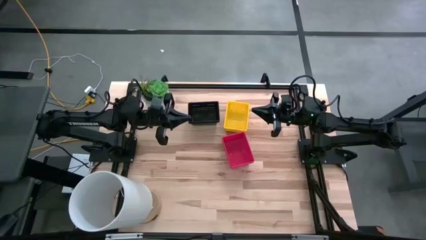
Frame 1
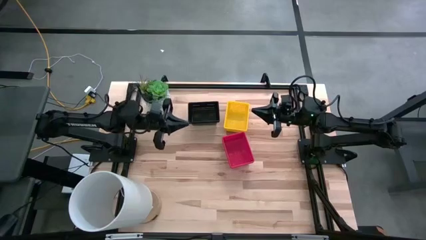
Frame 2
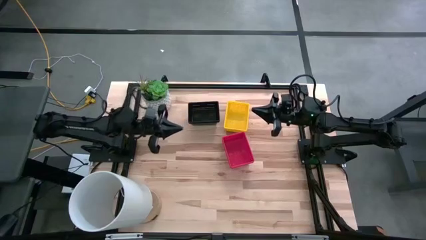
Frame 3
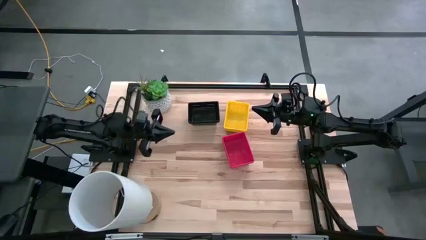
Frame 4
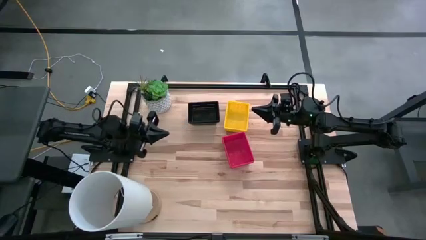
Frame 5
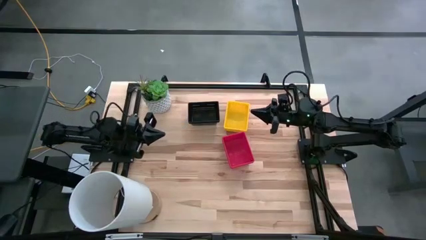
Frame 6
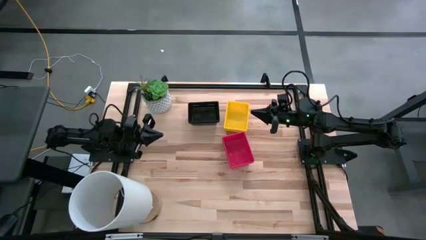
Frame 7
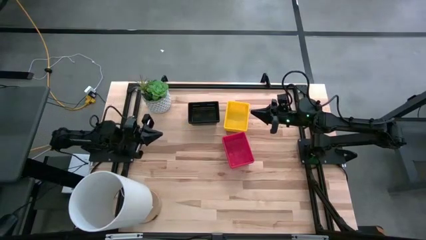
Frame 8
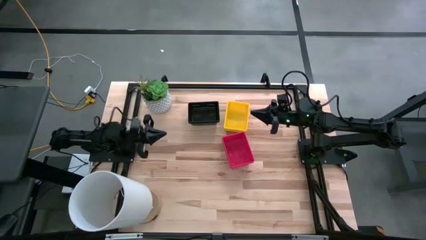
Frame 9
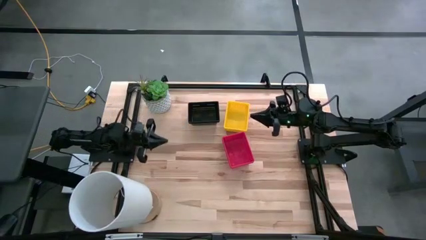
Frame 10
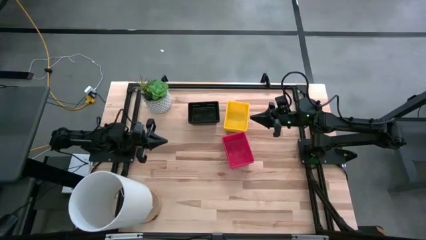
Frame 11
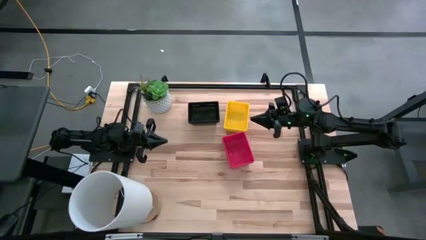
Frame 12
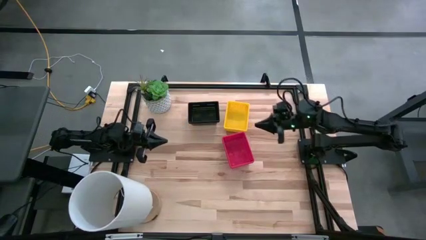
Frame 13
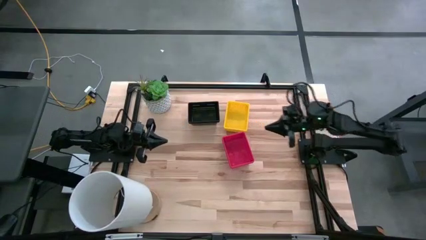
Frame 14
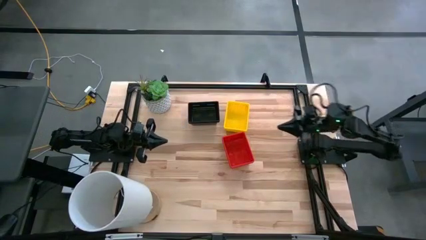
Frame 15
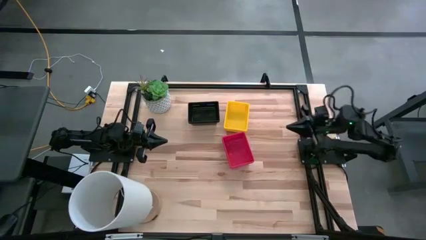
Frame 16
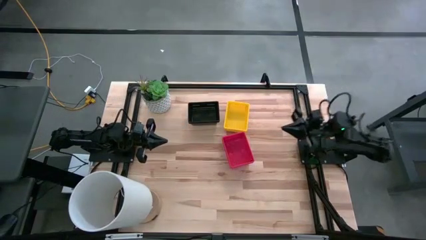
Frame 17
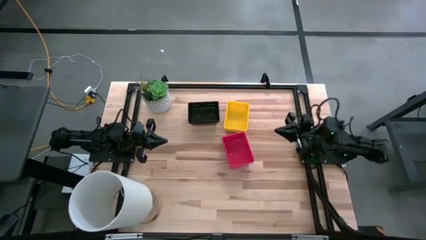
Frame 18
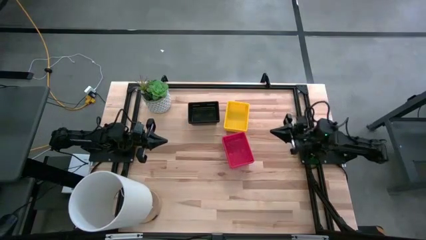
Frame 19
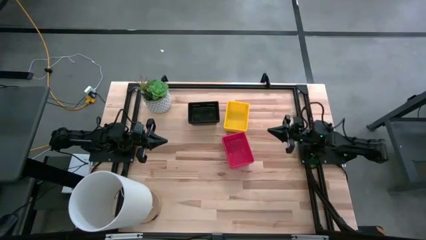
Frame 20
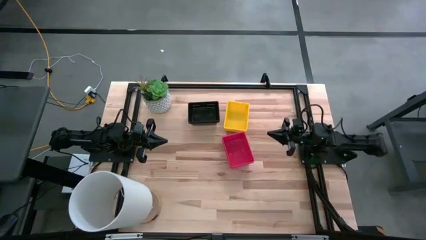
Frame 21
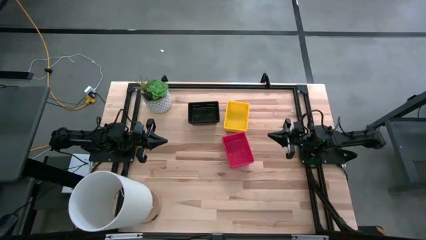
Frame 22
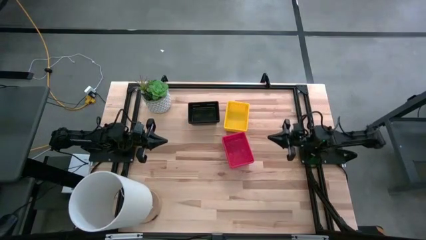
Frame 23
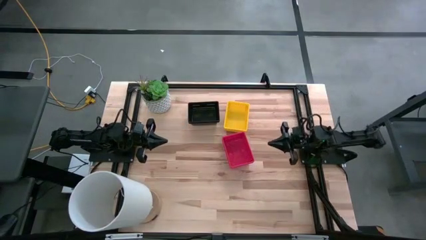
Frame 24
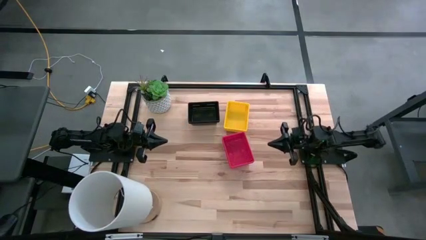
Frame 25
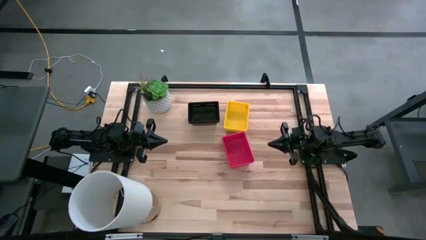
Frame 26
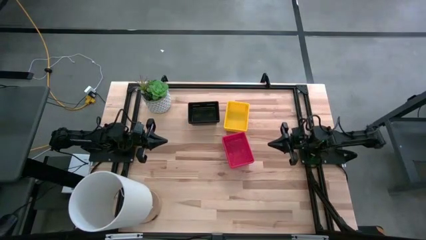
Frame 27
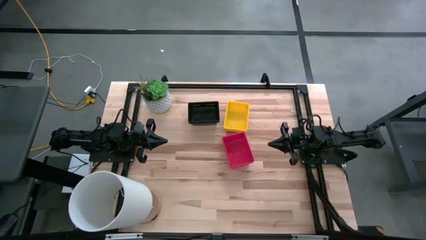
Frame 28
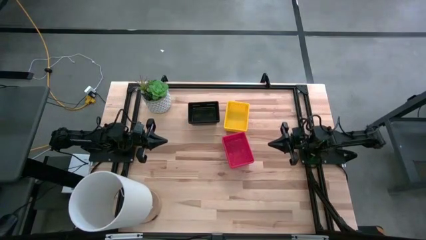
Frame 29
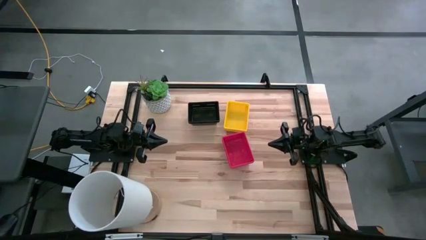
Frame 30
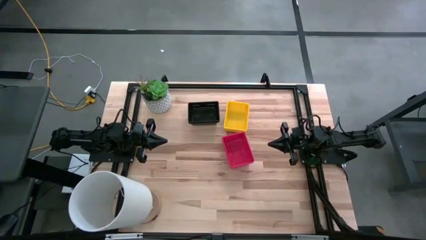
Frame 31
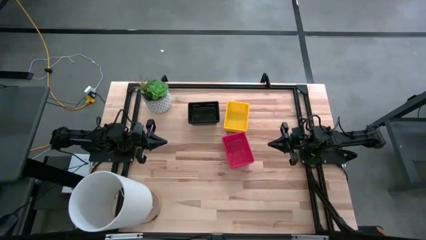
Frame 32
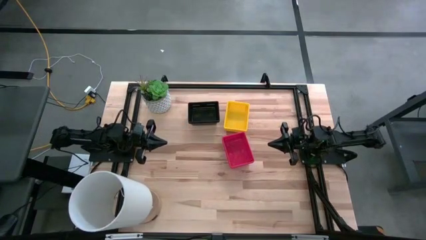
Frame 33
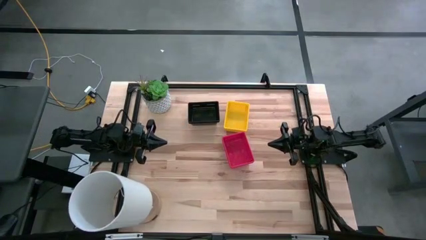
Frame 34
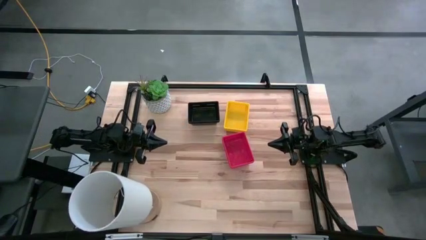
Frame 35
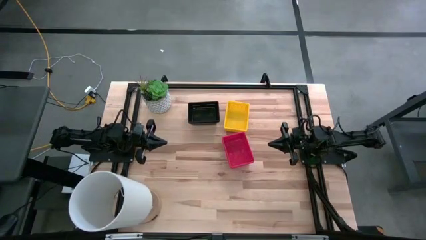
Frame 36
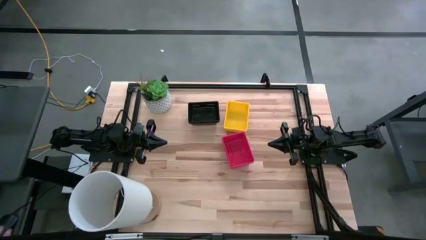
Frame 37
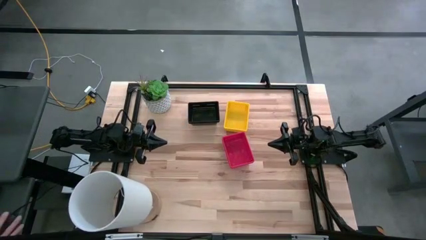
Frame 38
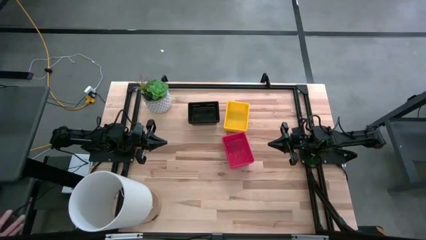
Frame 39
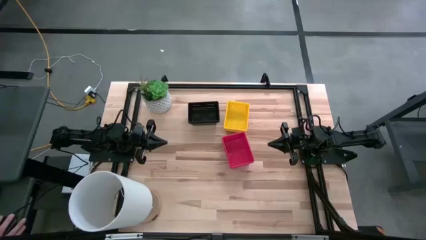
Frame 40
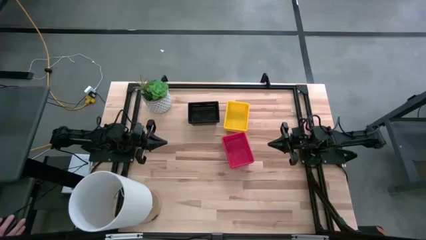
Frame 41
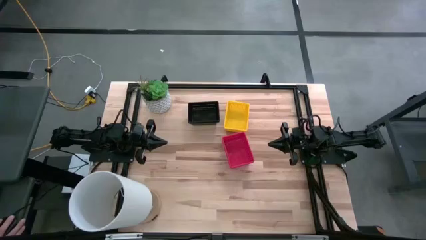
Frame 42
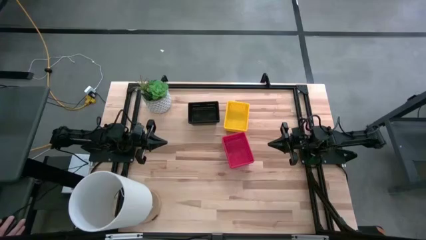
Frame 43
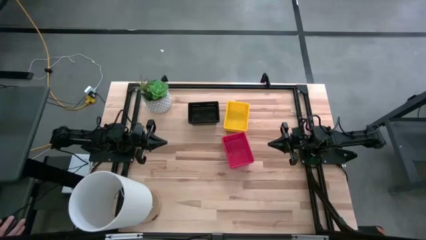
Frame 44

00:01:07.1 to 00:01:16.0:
Return to Home Position

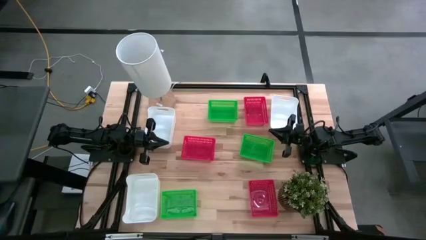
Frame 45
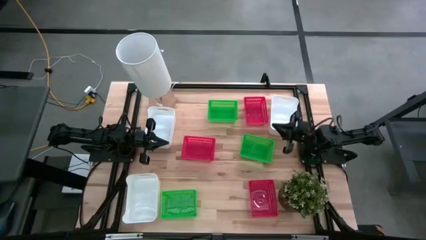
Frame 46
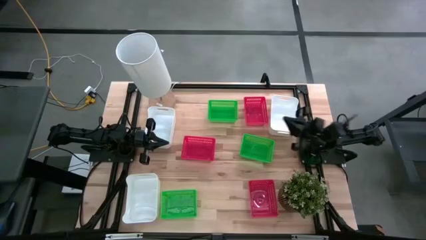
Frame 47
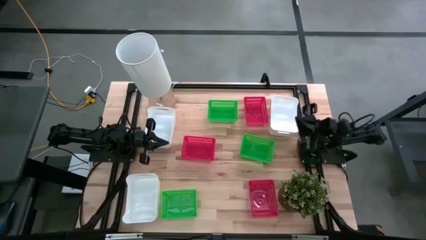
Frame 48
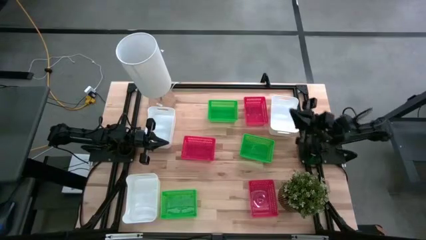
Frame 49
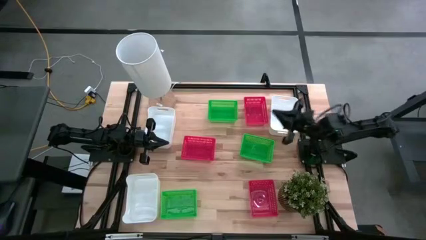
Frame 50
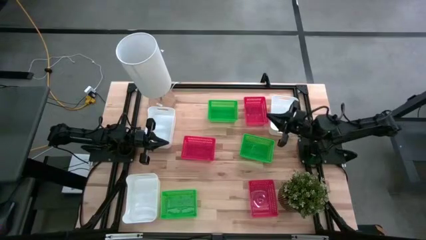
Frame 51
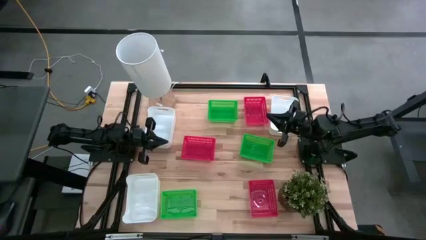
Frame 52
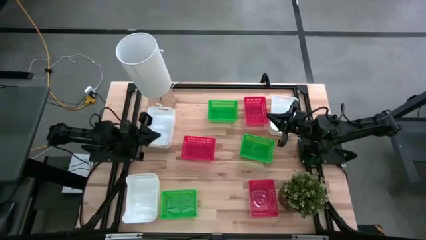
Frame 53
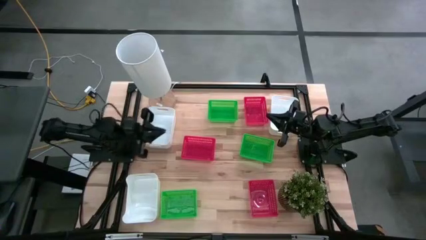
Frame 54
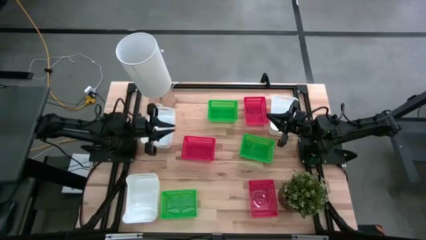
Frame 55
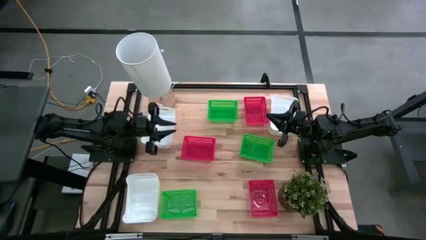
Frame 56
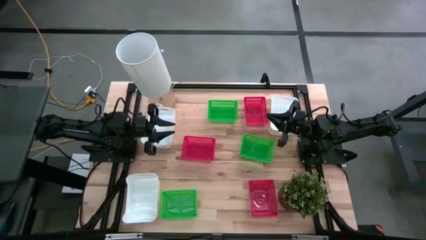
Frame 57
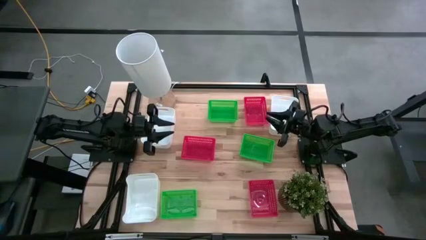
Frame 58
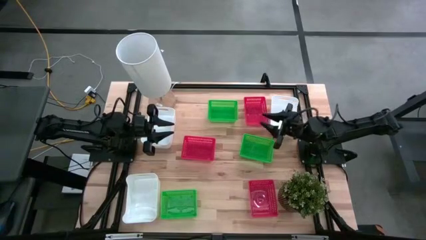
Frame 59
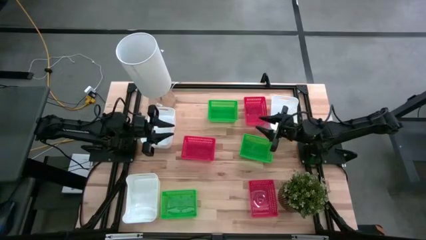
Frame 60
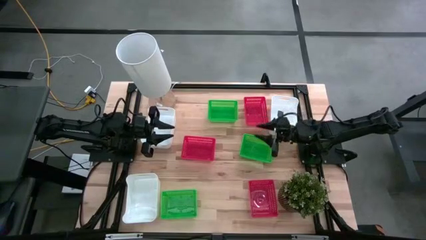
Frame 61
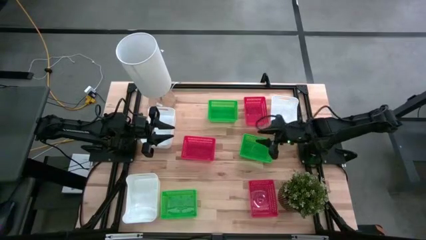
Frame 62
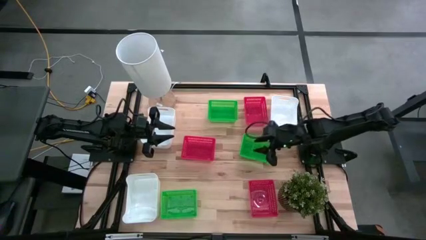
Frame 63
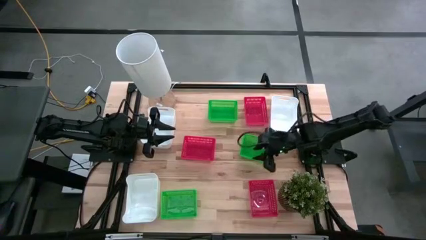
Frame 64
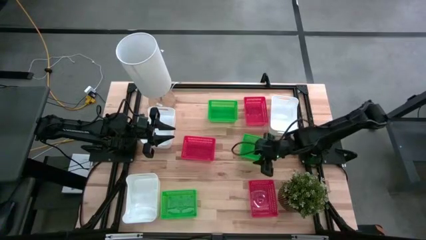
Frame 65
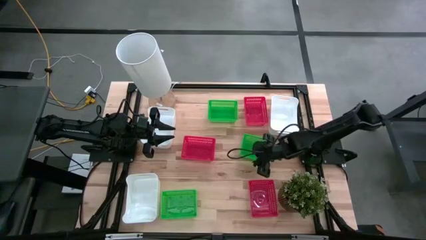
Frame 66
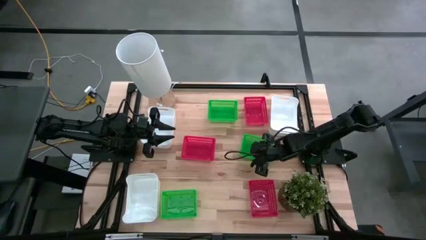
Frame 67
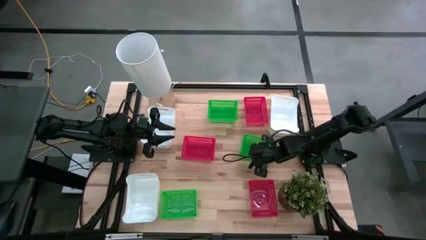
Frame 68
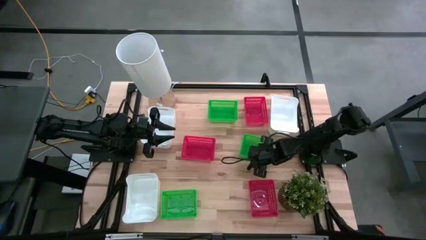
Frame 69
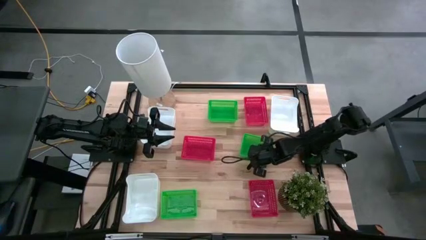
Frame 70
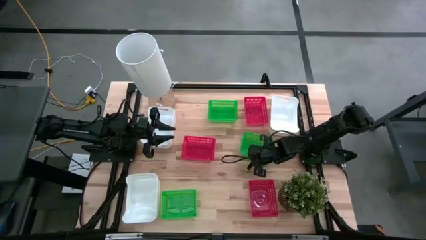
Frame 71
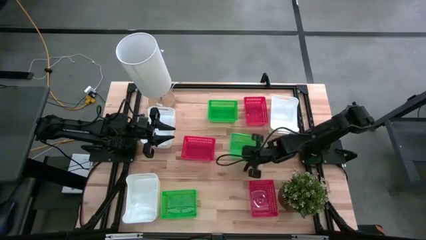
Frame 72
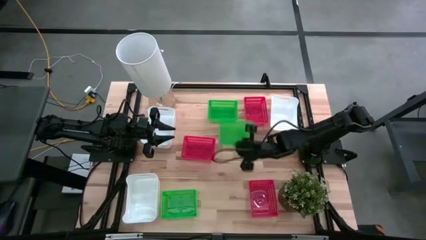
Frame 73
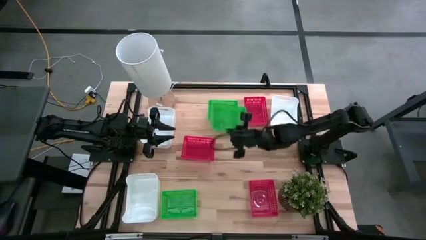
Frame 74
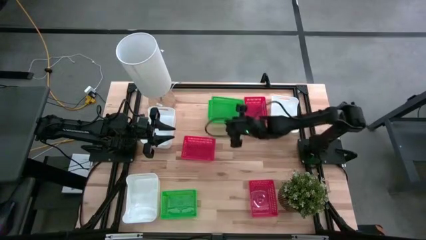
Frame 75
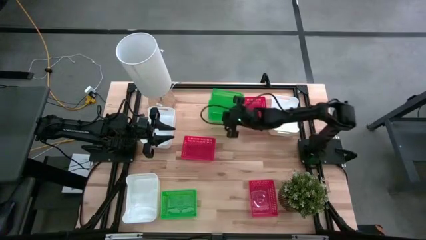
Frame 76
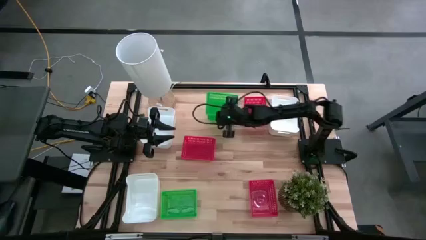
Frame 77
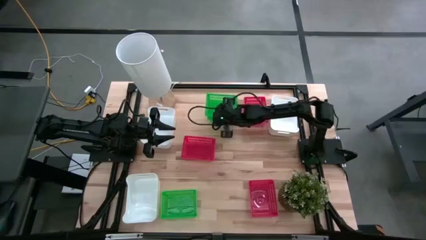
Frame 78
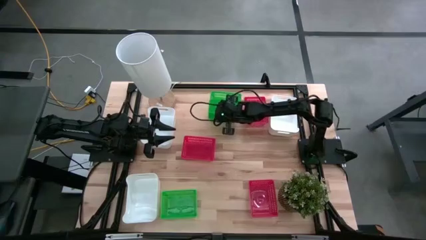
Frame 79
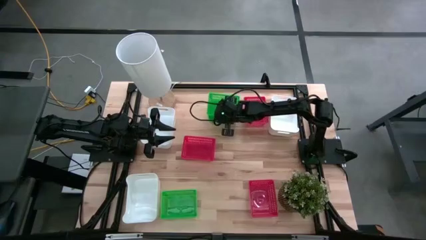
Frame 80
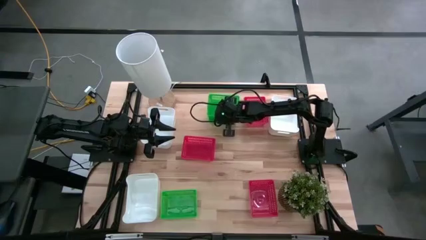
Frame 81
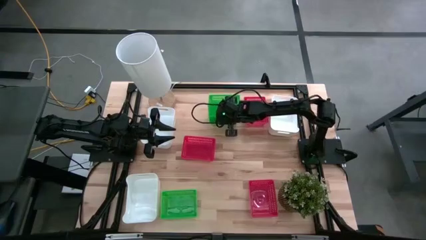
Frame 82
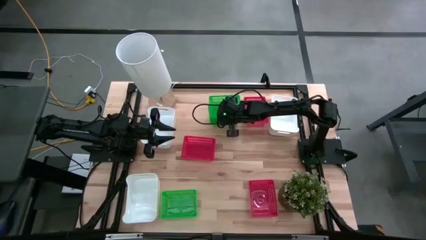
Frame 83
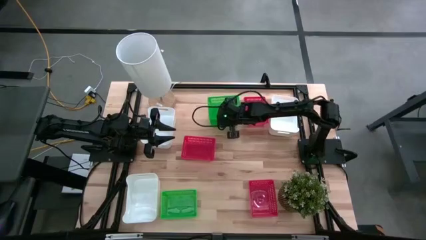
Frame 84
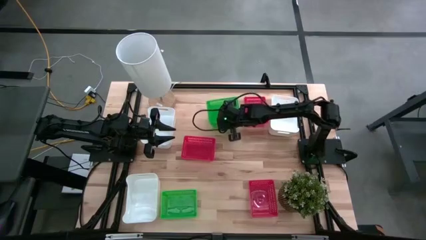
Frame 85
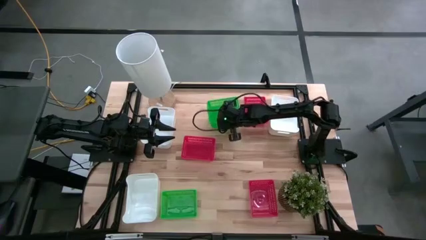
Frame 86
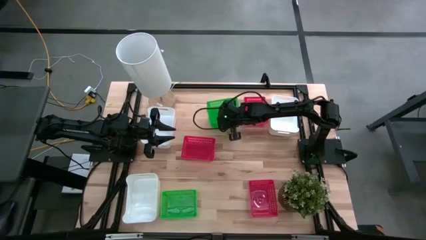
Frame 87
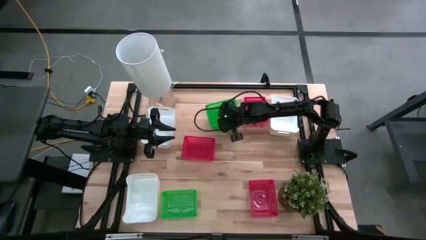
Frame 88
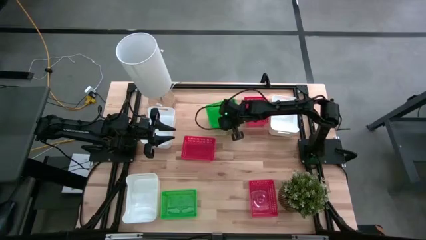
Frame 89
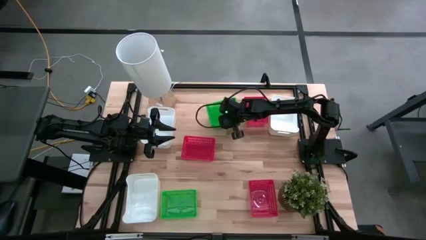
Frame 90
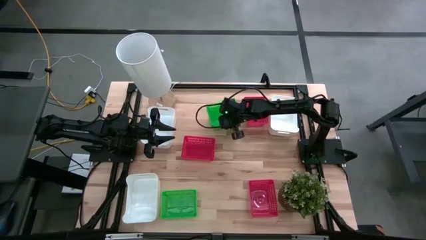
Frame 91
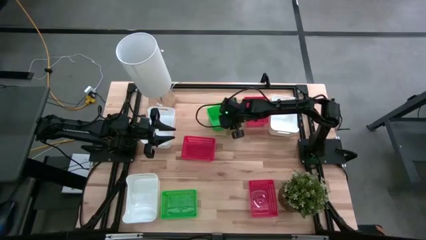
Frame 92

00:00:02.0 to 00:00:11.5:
Stack the middle green bin on the top green bin
